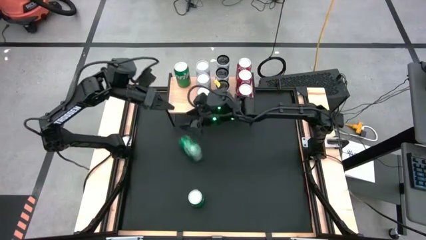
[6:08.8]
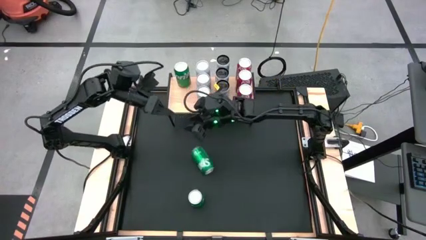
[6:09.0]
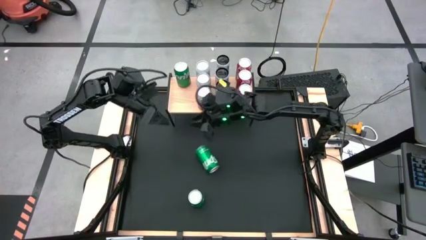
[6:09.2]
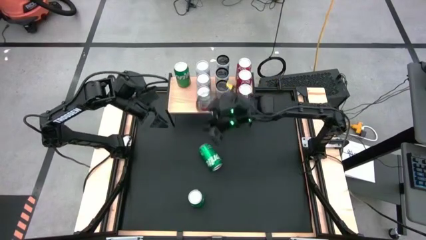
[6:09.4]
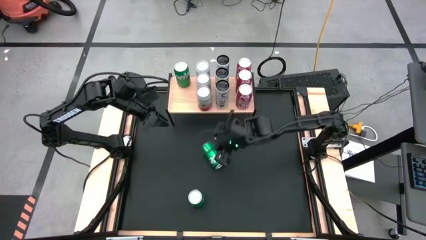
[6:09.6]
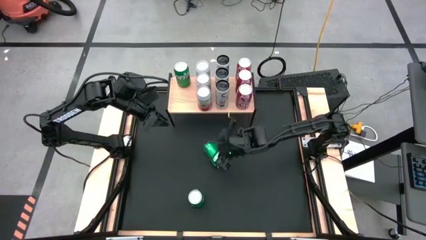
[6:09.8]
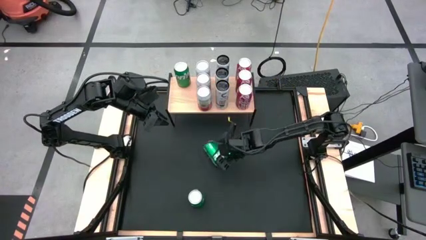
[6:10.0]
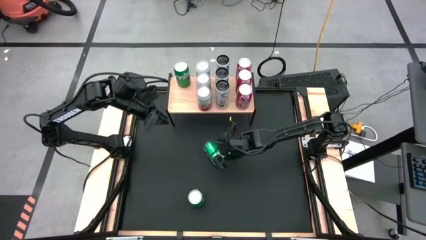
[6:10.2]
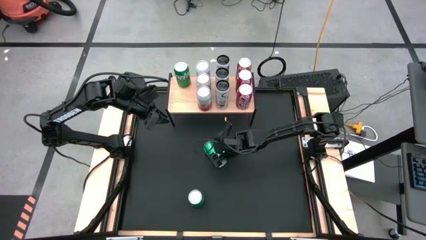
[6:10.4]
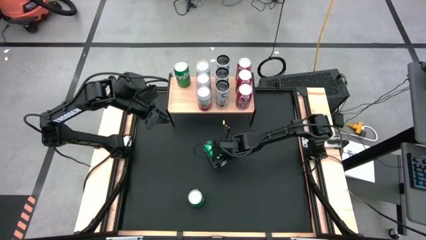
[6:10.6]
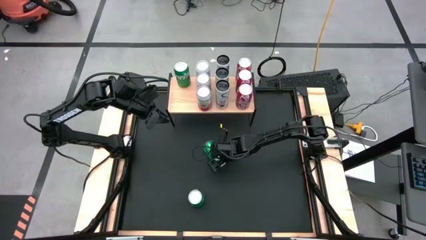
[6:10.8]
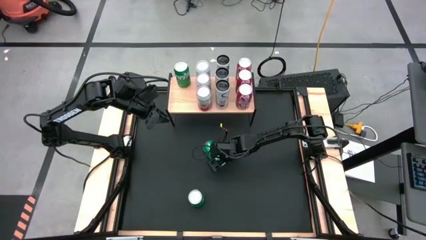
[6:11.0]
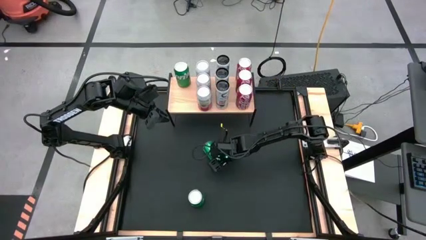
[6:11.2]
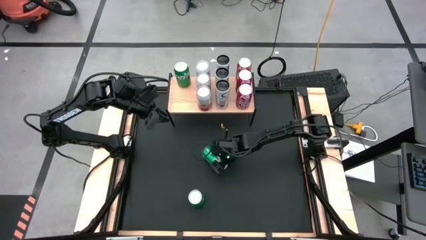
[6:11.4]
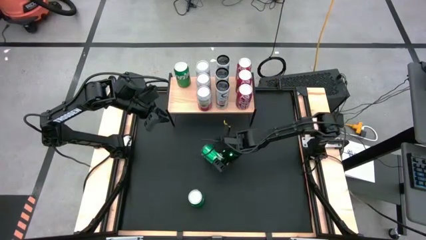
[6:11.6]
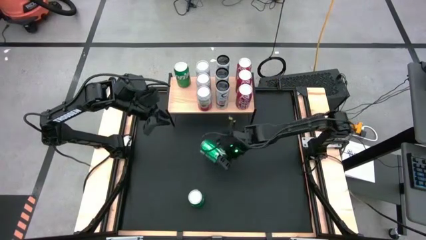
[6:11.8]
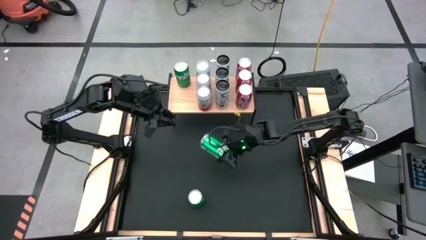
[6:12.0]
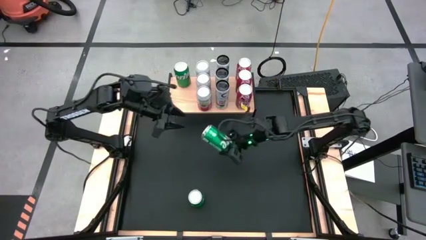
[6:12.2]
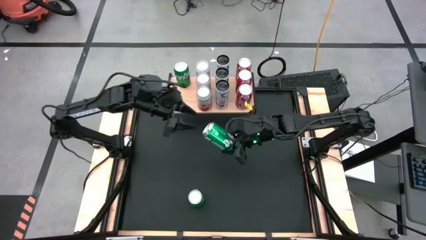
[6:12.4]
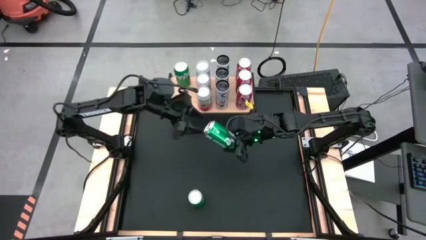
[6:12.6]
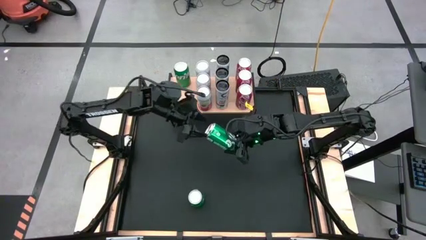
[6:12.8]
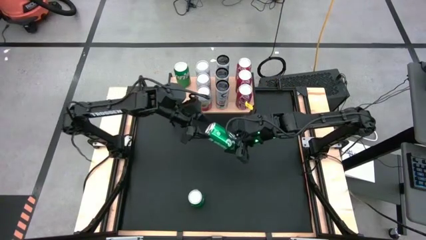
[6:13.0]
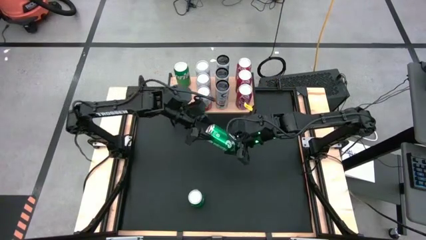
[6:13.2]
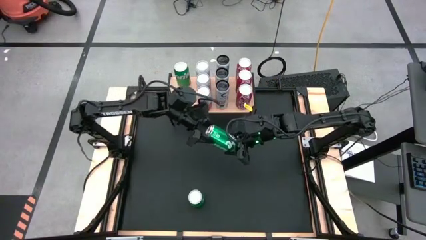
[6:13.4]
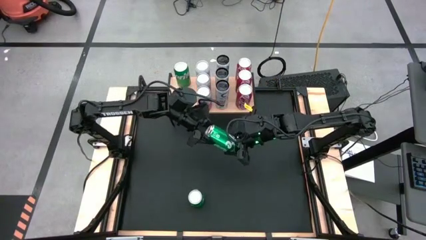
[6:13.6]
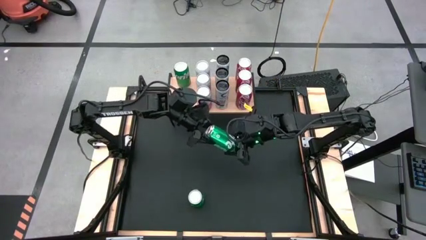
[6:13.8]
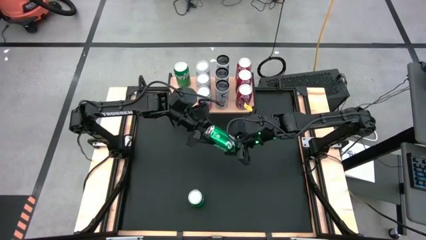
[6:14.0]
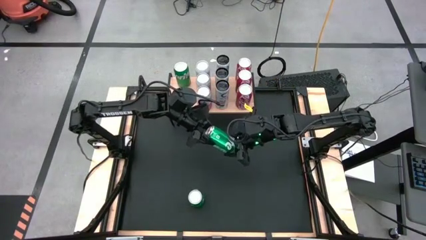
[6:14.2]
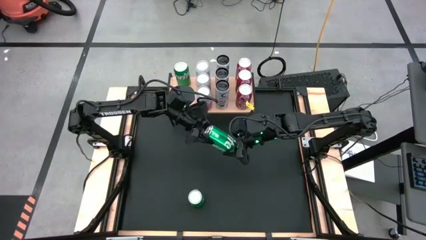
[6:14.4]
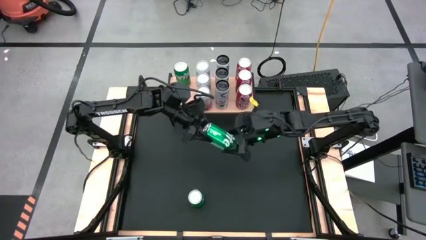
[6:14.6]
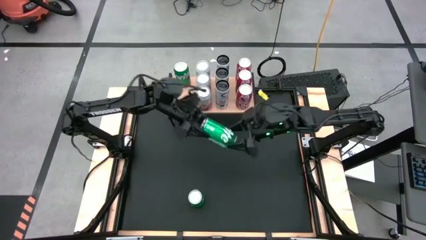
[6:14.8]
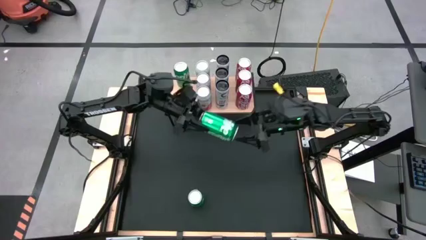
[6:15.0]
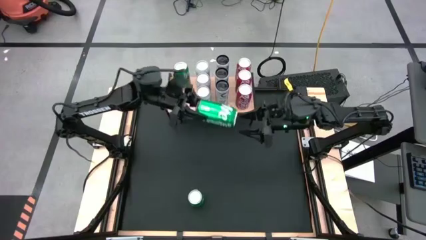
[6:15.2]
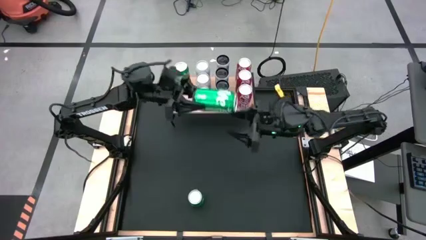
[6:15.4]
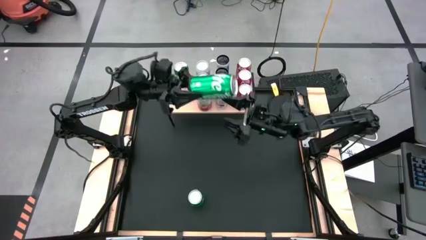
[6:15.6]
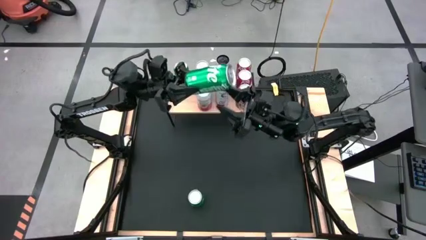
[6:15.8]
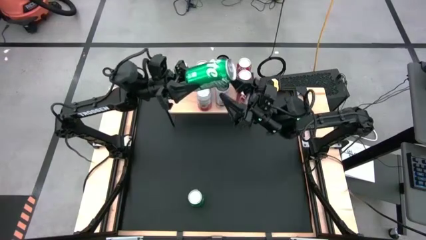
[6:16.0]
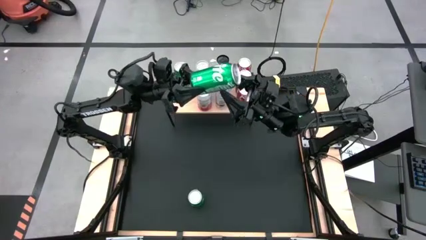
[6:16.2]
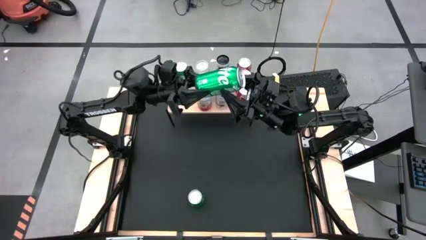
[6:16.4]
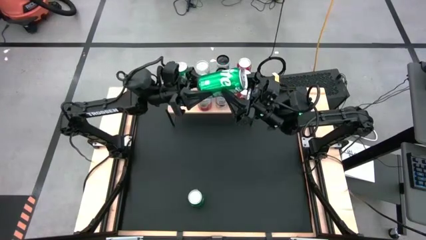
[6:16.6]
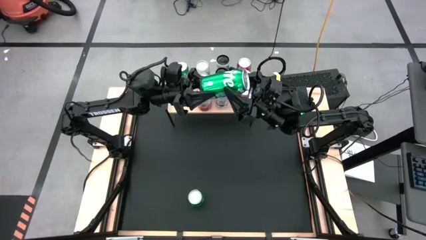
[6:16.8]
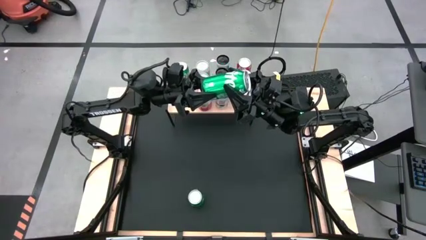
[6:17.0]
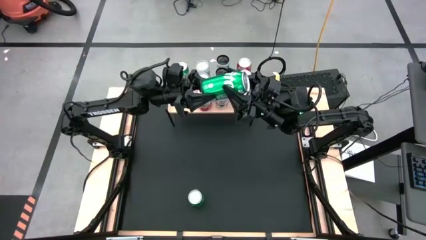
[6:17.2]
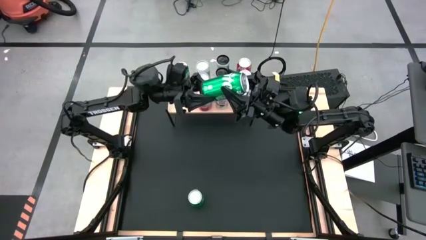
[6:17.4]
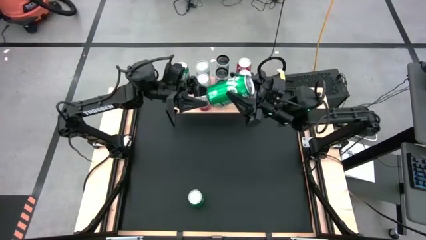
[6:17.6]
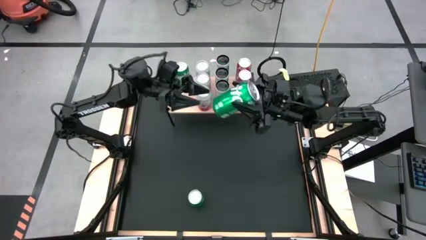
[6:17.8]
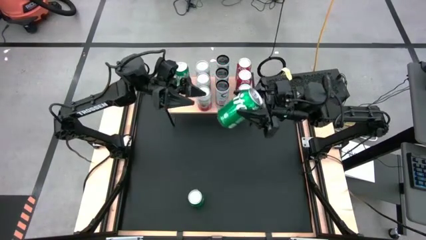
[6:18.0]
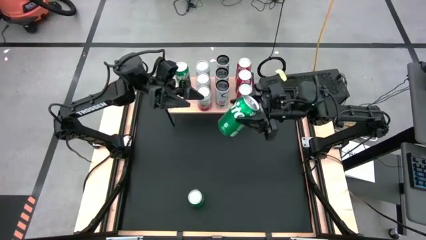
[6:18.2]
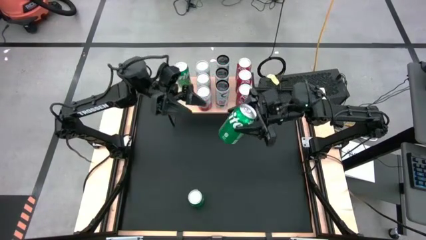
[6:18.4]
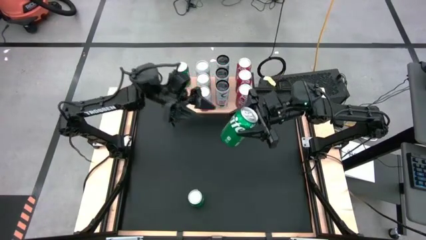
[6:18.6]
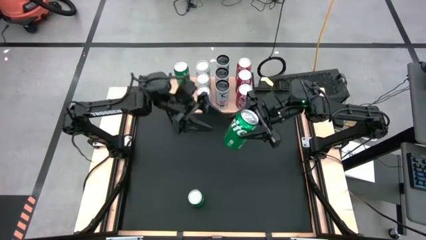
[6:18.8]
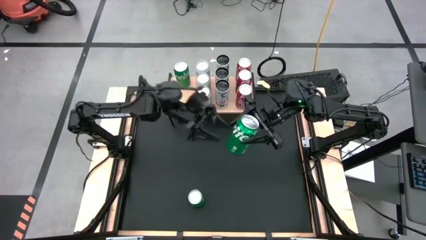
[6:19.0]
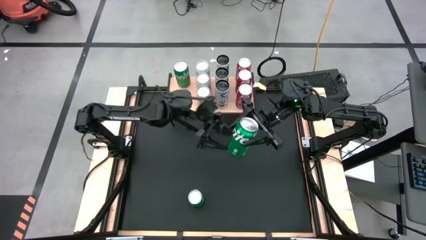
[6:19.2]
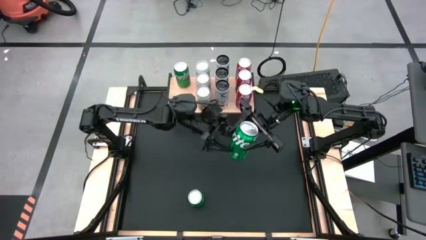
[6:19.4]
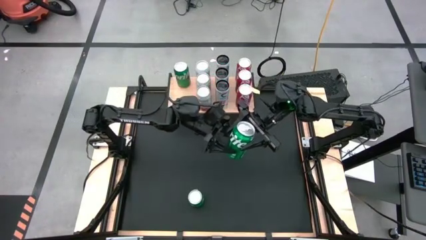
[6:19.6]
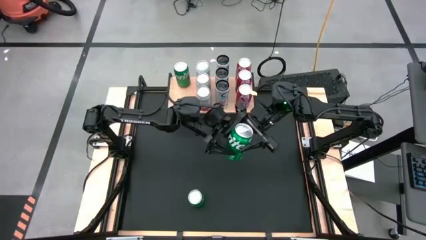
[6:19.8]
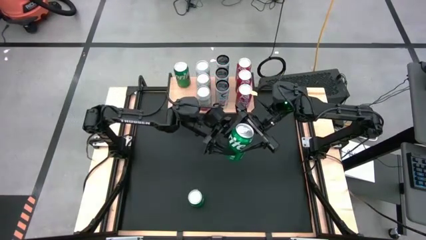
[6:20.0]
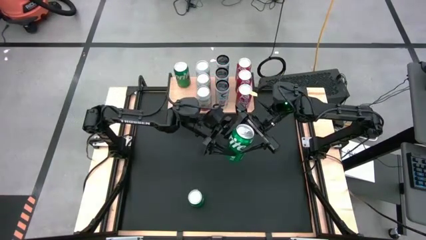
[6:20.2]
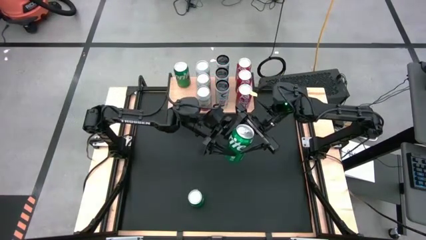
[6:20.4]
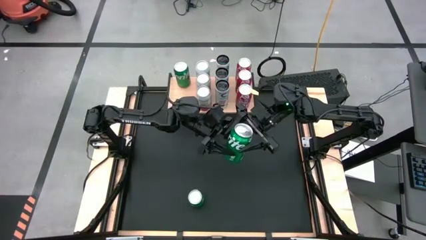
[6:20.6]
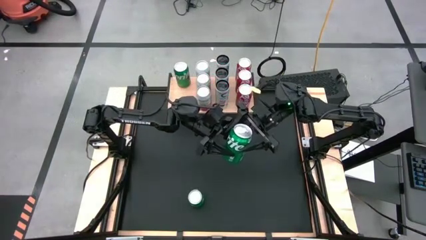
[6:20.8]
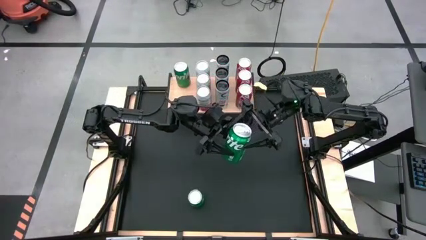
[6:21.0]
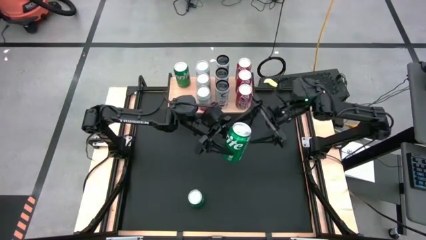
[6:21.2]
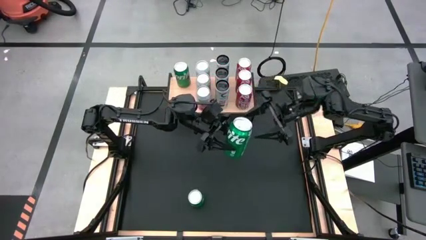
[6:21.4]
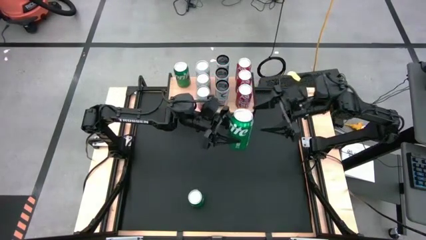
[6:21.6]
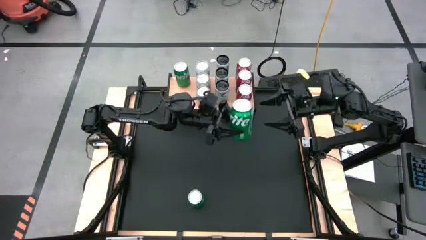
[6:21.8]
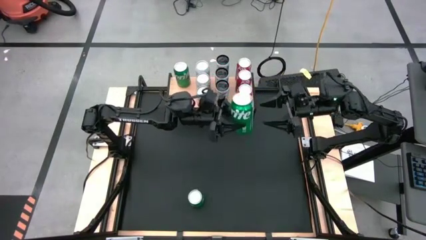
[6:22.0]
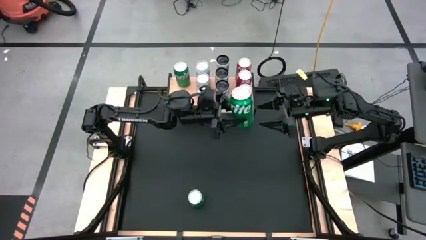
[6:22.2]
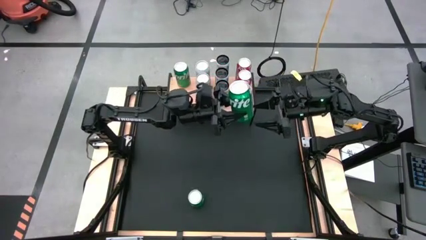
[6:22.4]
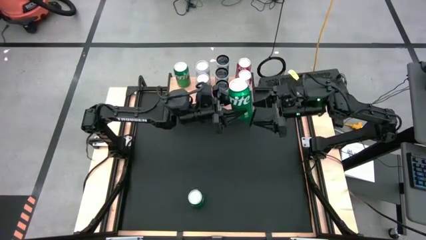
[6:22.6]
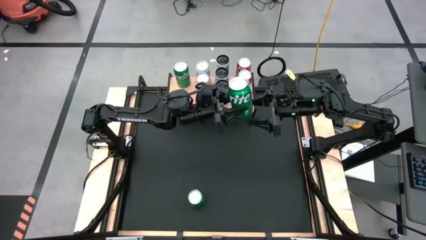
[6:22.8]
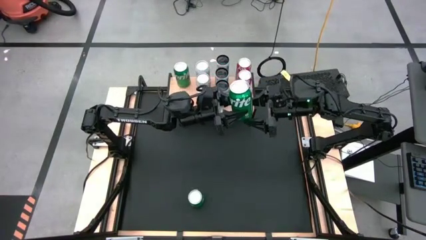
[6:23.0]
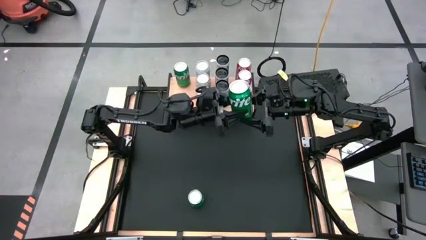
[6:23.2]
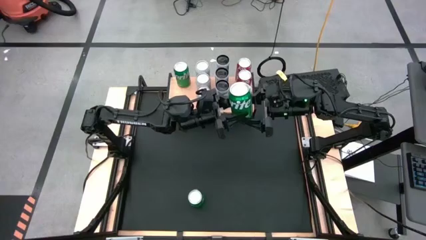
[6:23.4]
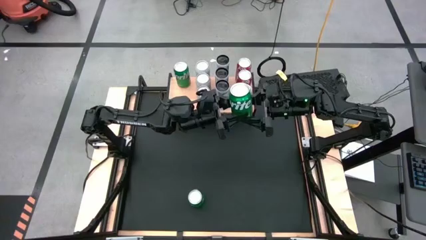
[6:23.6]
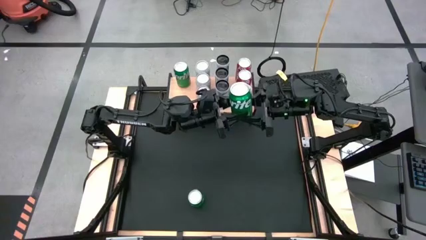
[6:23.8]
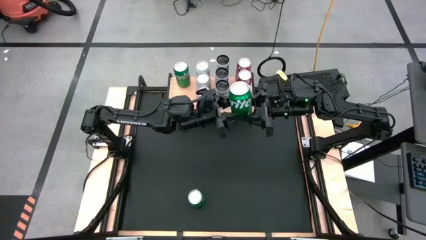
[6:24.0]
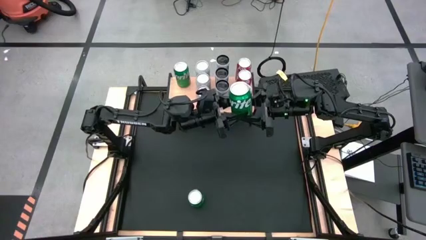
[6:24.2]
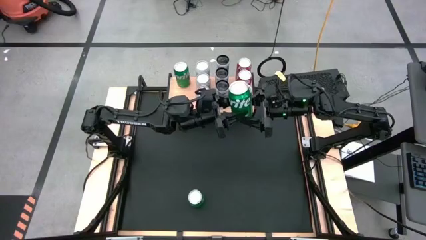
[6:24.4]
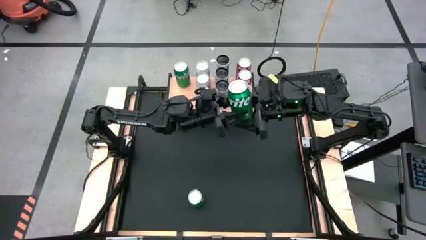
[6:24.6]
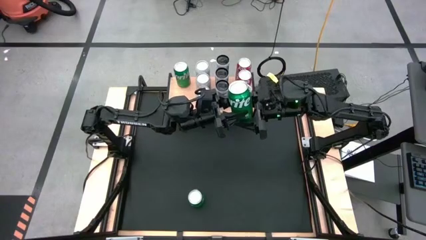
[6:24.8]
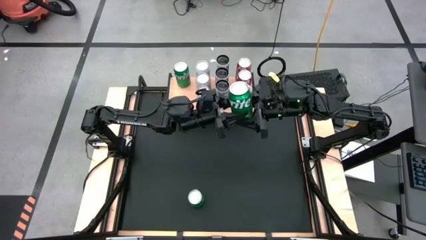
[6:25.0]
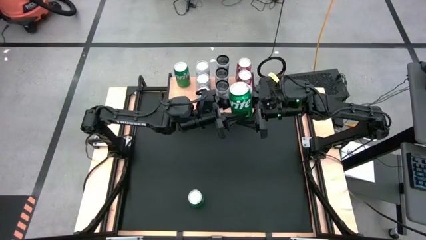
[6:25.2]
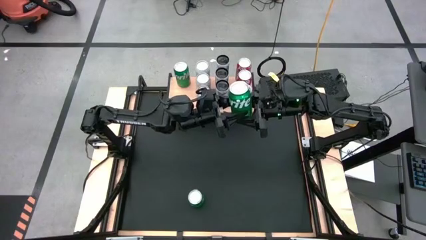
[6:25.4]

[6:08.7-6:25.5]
Task: Place canned beverage on shelf
Put the top green soda can aligned with the other green soda can on the shelf
